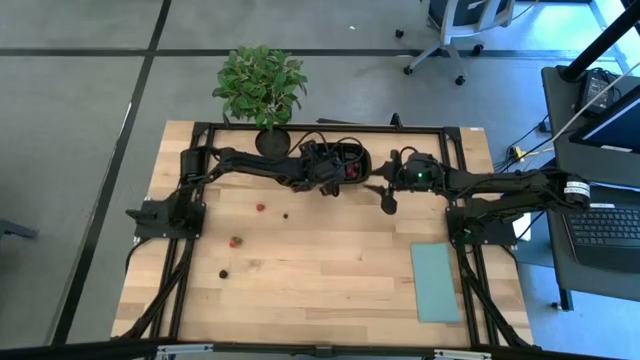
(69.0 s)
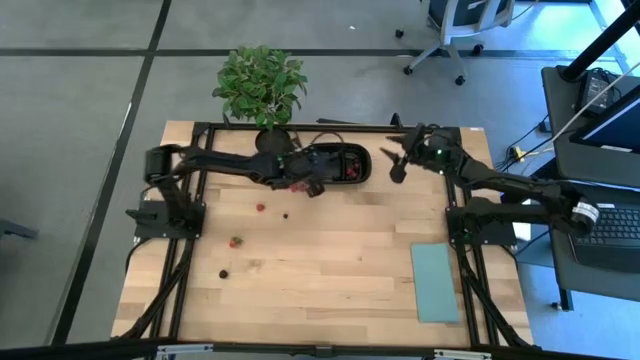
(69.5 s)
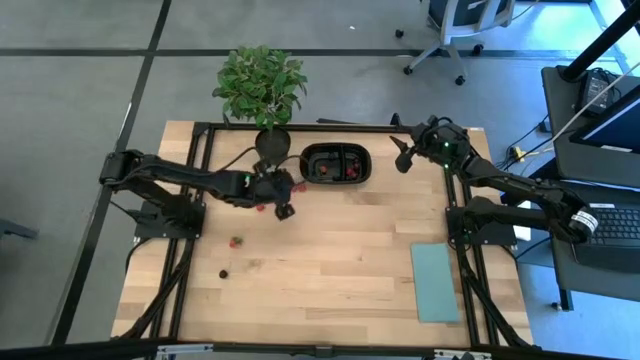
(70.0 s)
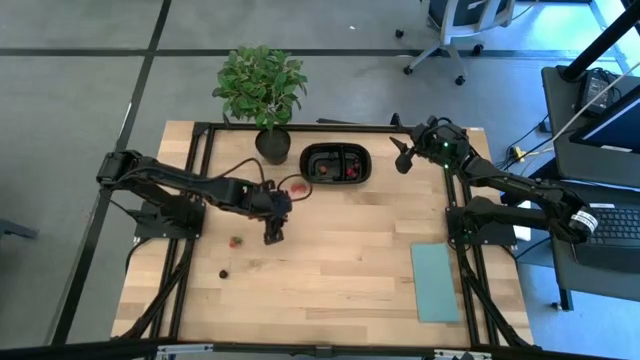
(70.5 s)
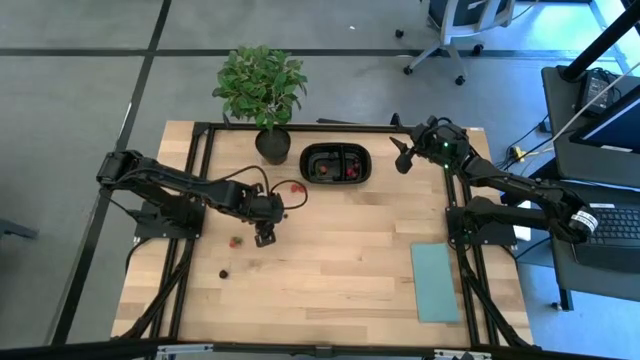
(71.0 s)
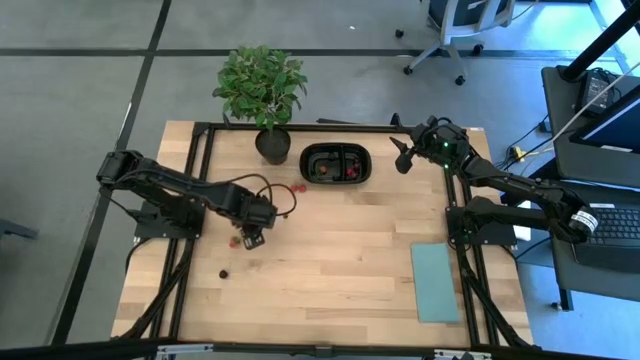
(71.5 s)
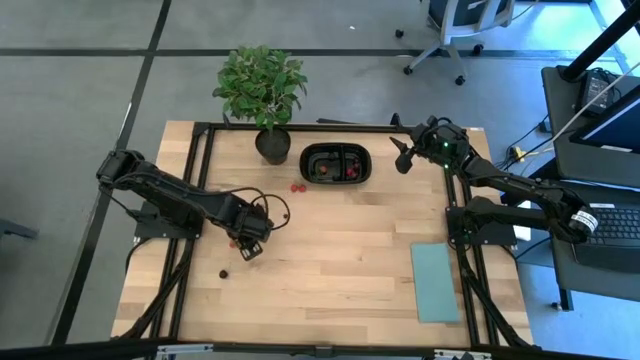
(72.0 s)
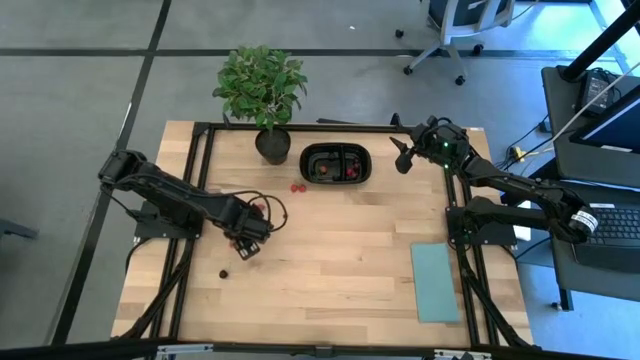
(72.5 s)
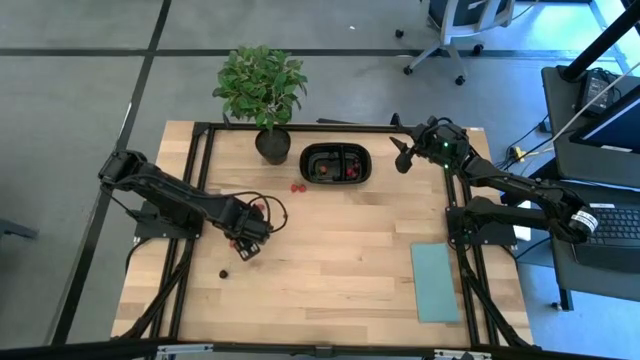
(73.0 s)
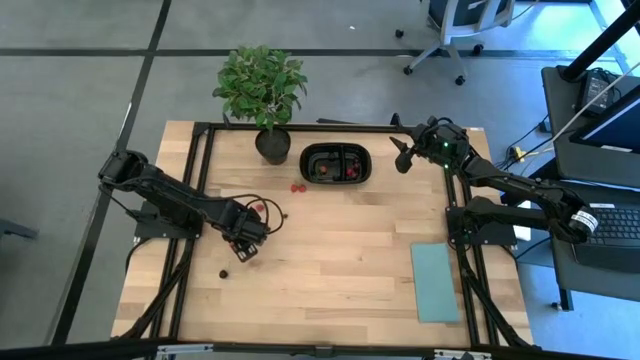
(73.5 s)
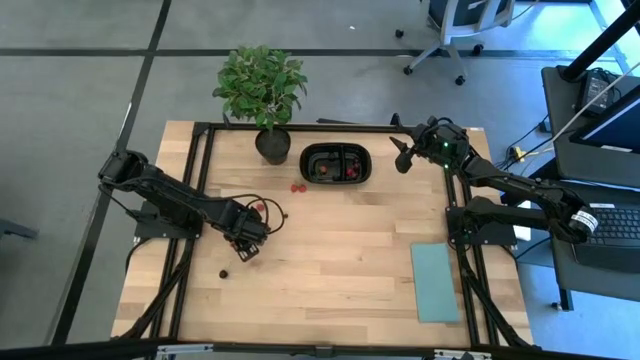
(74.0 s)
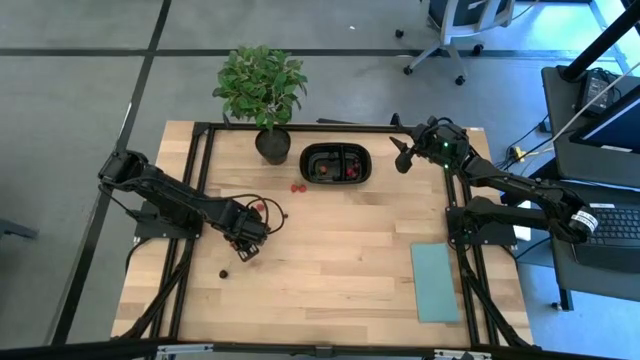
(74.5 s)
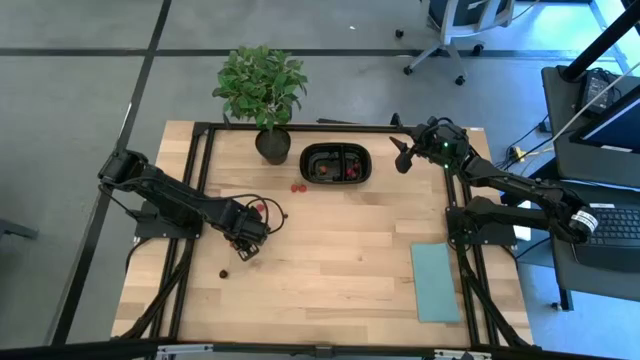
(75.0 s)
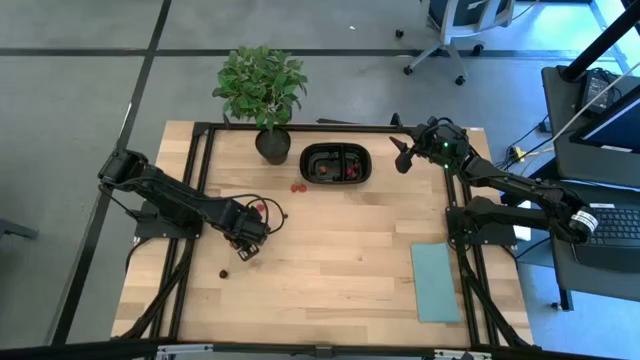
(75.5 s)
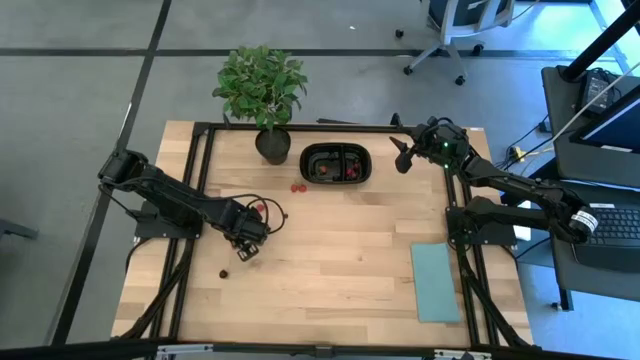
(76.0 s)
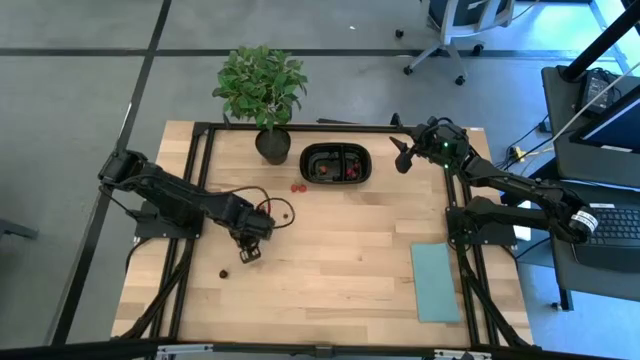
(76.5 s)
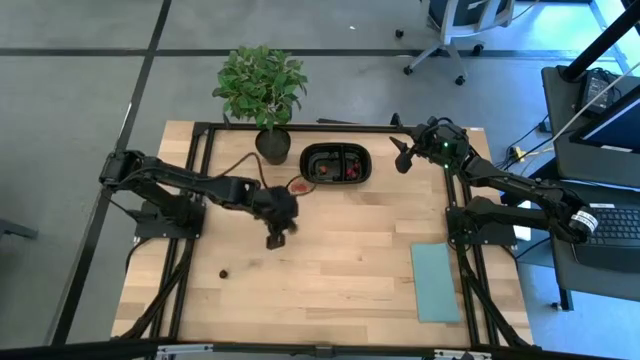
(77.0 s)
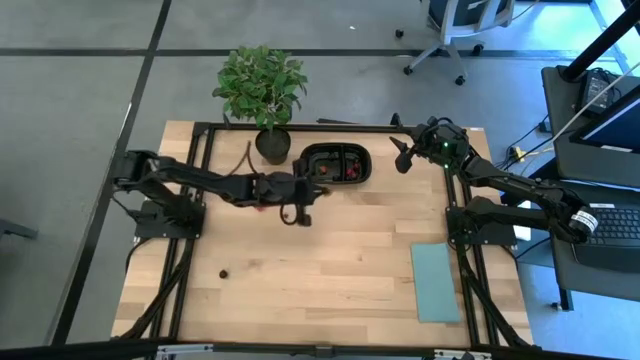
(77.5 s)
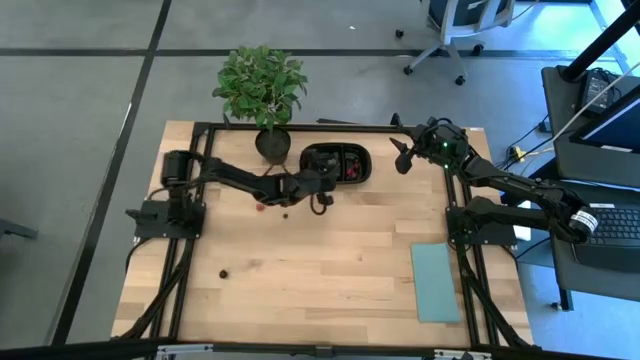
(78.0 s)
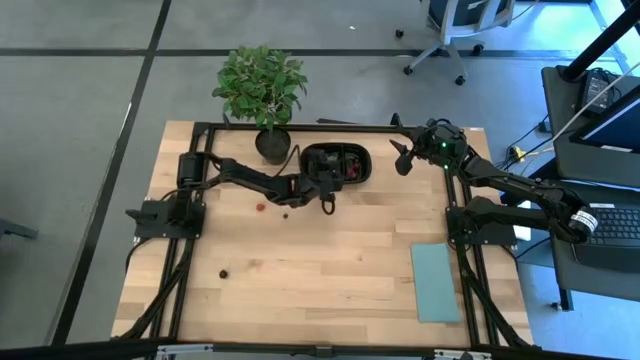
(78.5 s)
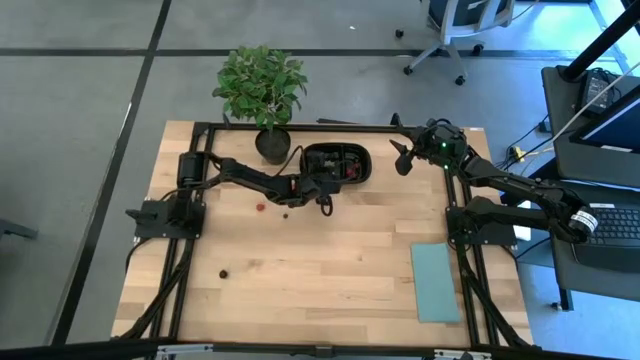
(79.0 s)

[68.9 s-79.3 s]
Task: Pick and placing Produce into tupperware
Put the bottom strawberry into the black container

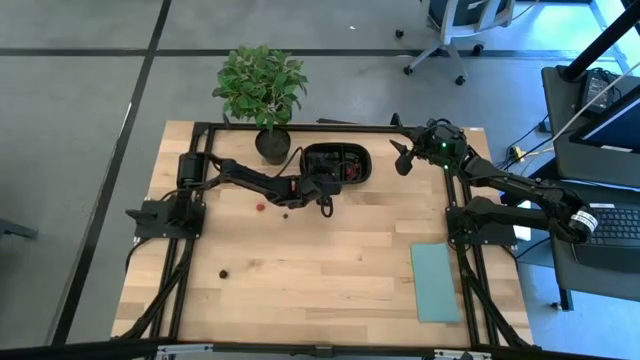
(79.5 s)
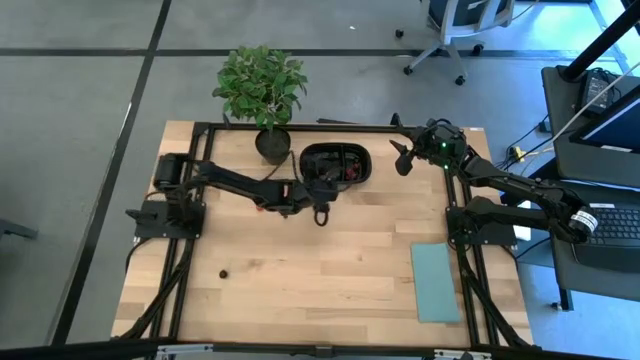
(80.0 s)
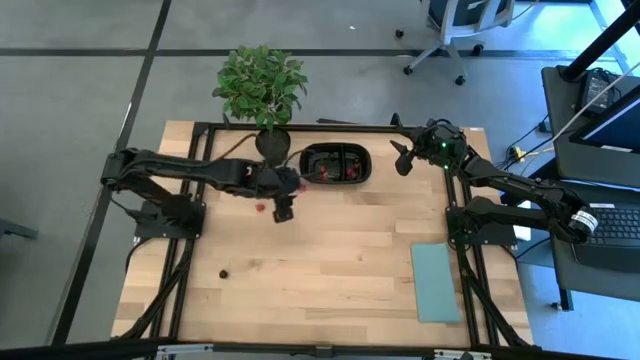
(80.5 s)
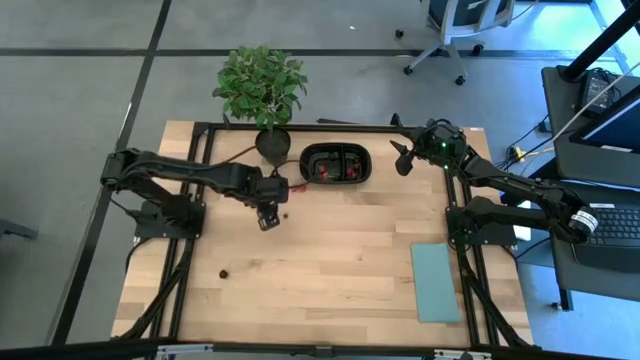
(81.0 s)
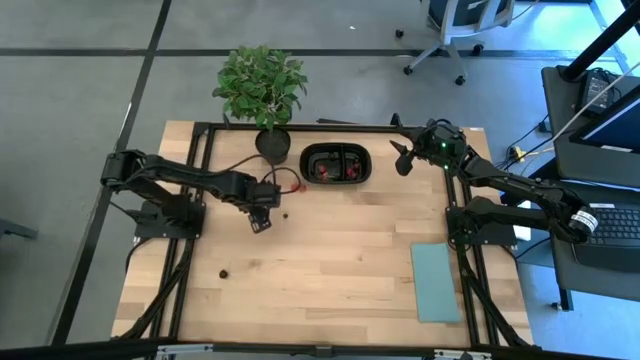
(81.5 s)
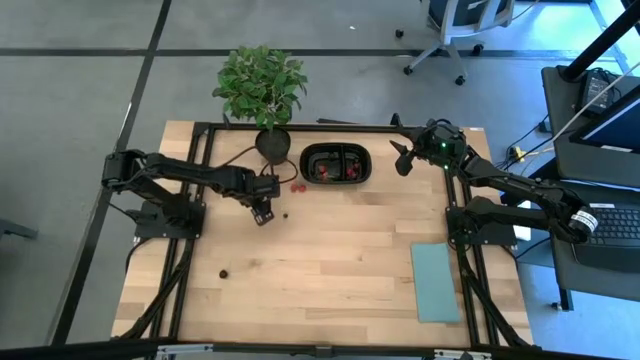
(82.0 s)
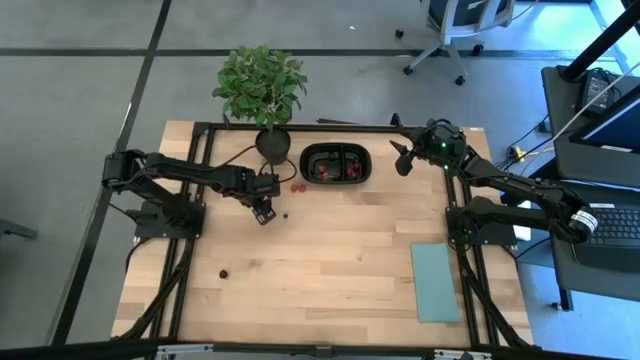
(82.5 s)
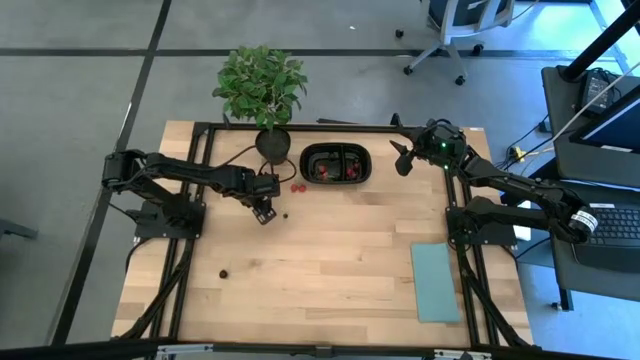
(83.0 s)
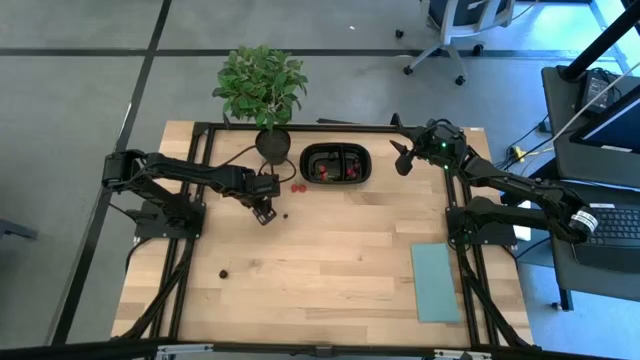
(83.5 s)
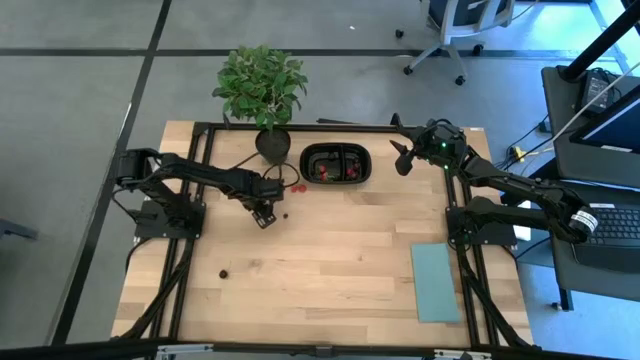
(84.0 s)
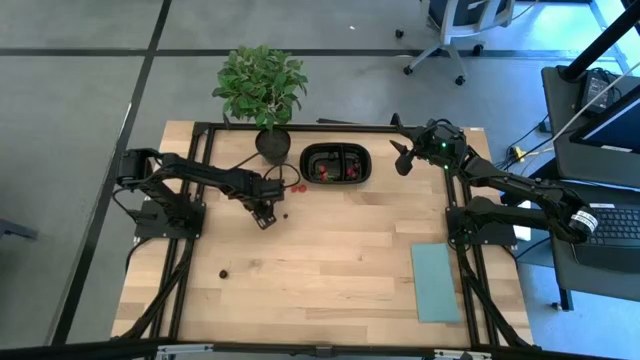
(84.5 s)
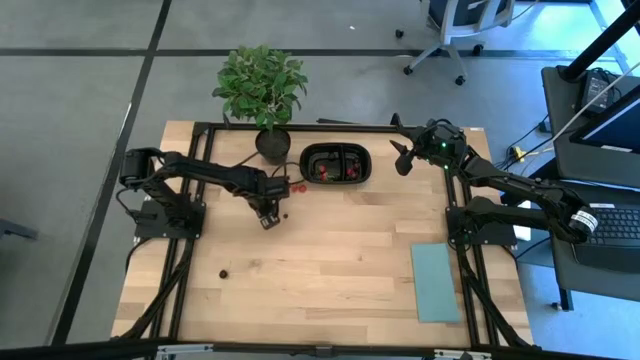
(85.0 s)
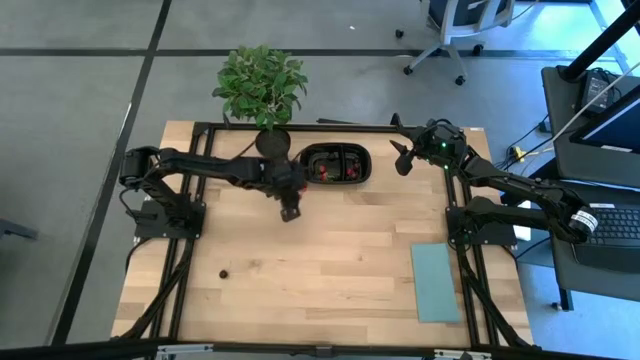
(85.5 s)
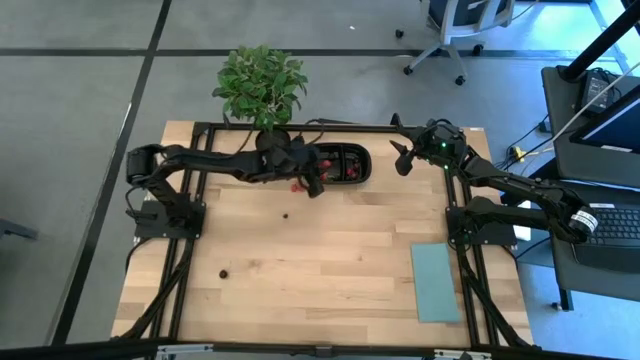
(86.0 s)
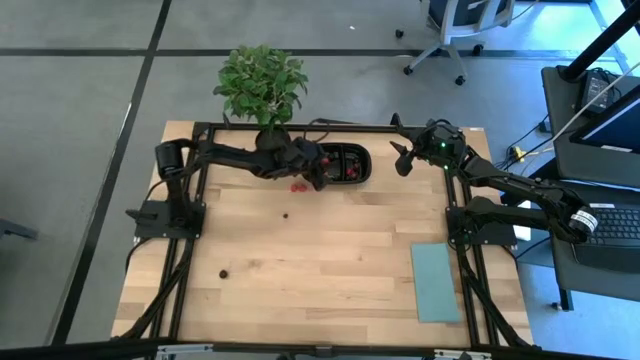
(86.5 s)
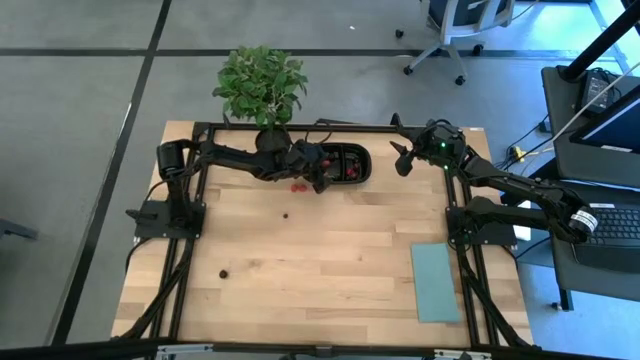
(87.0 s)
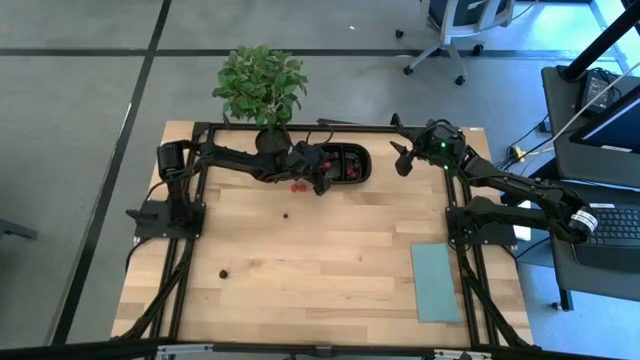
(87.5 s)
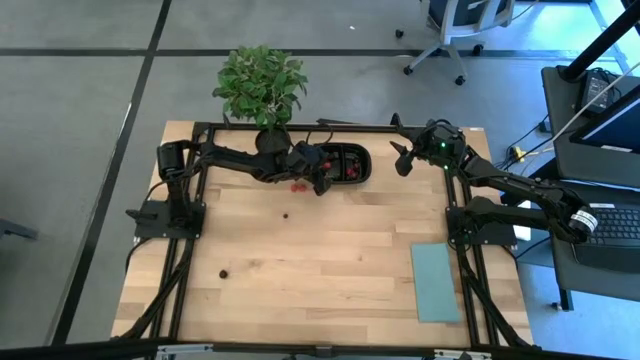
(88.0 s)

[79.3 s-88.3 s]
Put the left raspberry into the black container

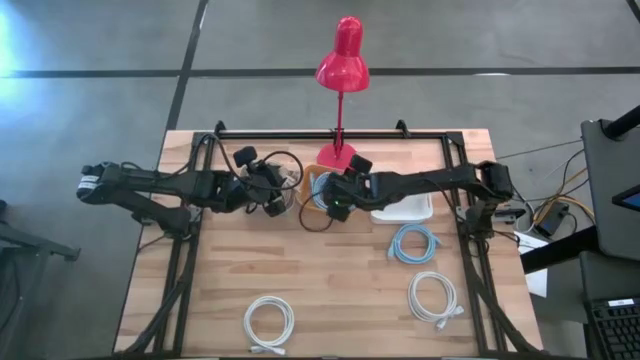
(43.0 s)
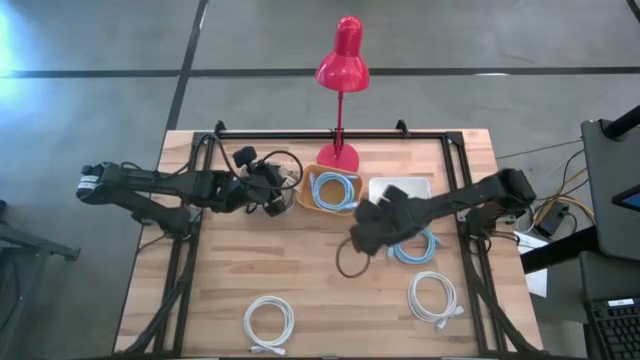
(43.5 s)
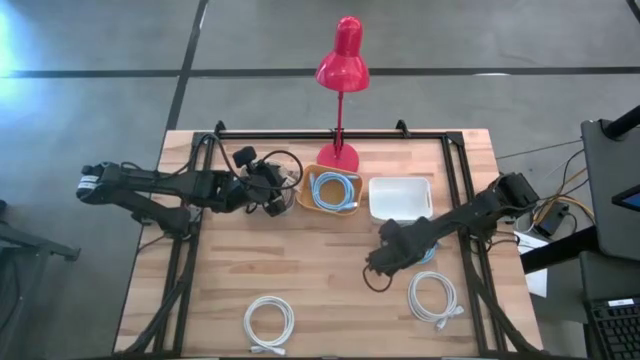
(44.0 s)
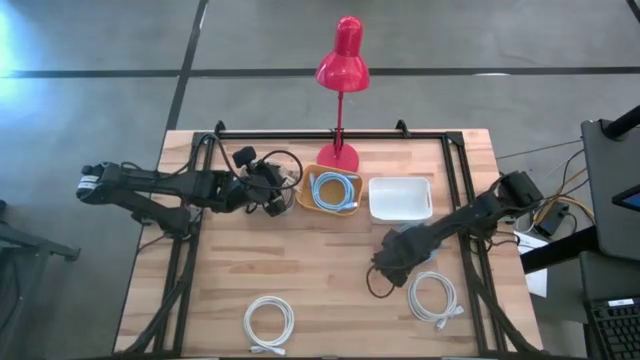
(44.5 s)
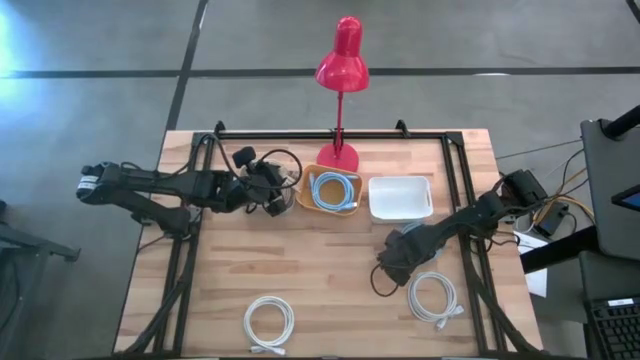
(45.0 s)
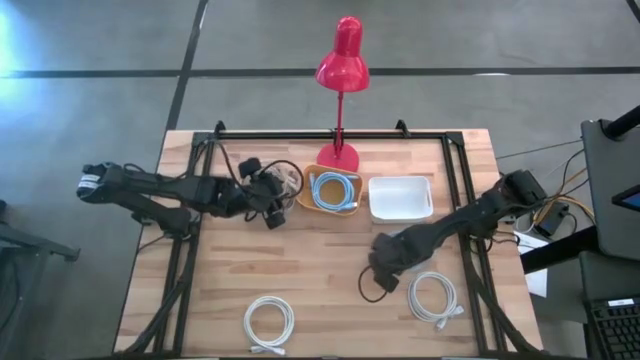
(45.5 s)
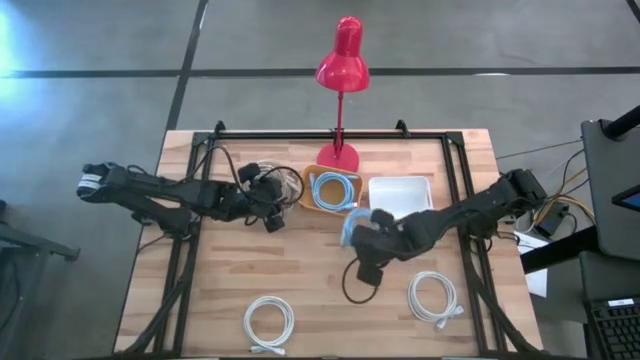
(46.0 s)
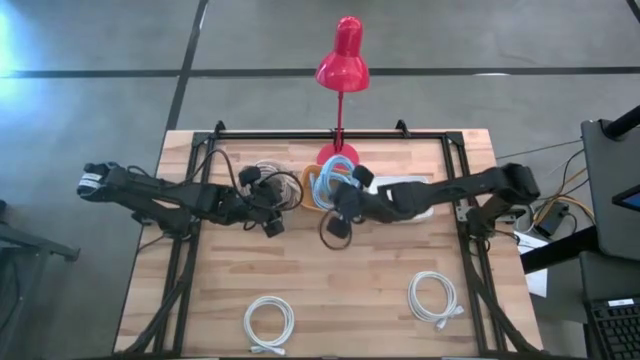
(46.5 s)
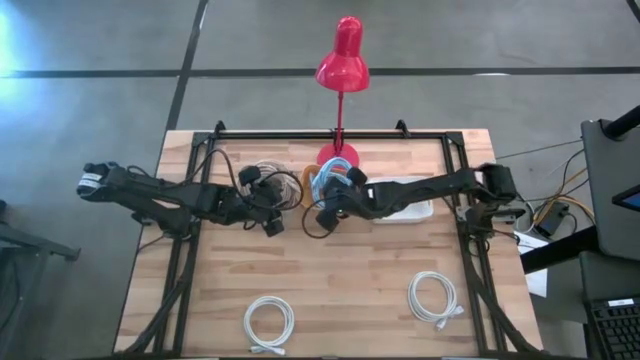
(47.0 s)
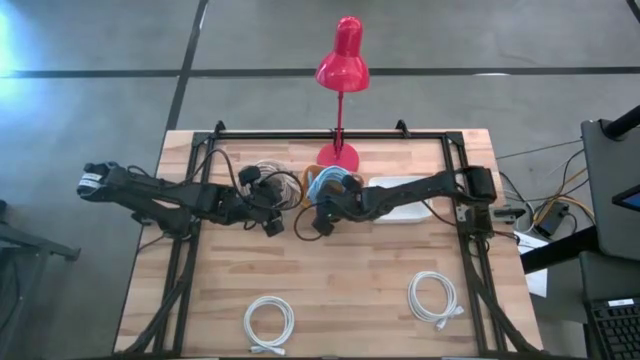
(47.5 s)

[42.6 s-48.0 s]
Task: Sort HDMI cables
Put the blue hdmi cable into the orange bin
